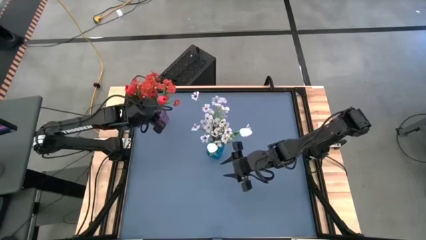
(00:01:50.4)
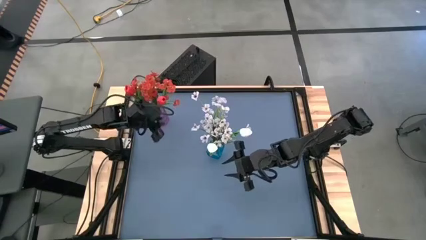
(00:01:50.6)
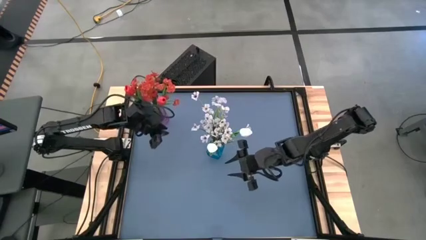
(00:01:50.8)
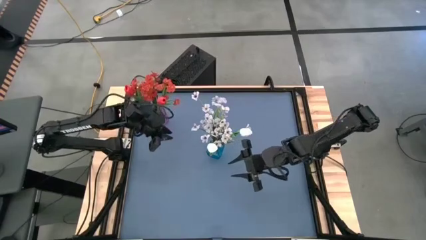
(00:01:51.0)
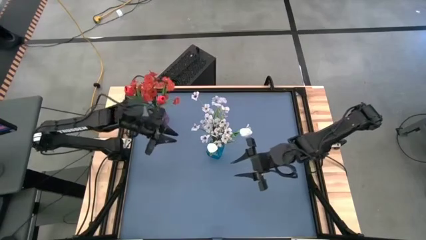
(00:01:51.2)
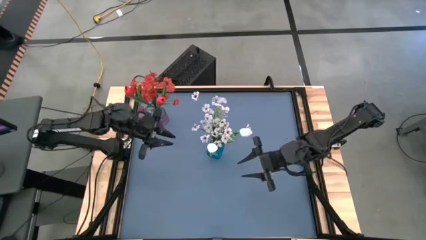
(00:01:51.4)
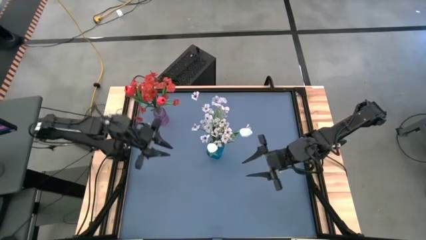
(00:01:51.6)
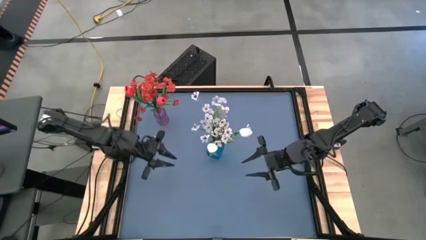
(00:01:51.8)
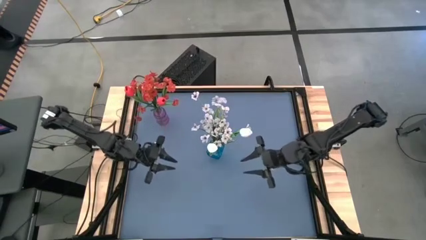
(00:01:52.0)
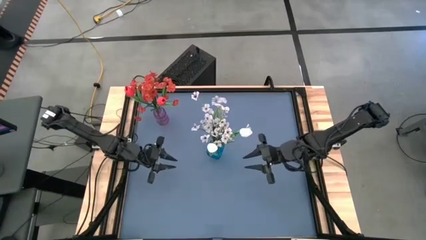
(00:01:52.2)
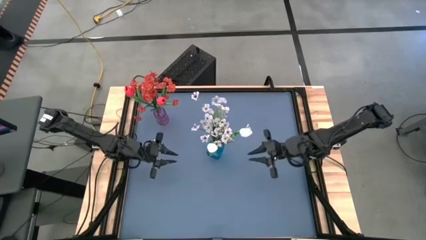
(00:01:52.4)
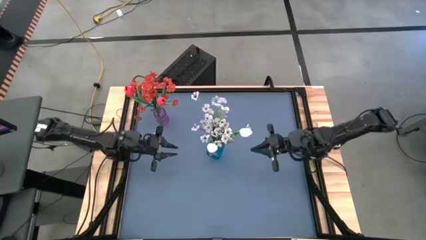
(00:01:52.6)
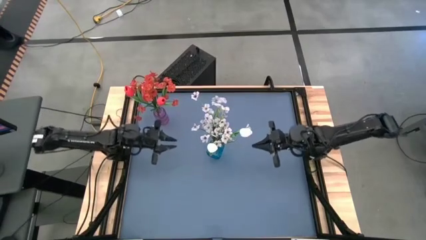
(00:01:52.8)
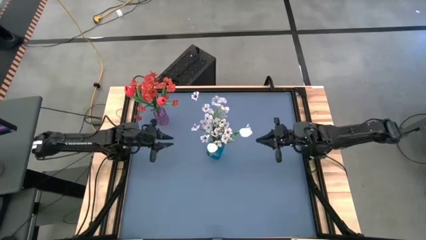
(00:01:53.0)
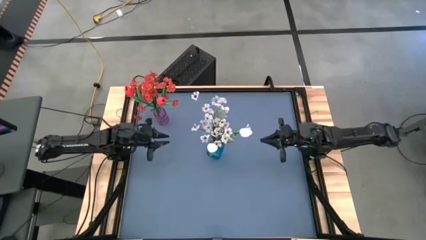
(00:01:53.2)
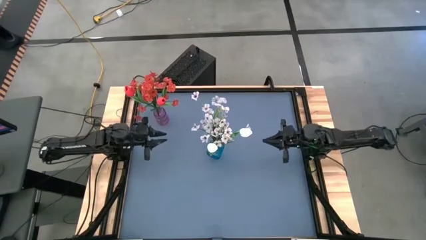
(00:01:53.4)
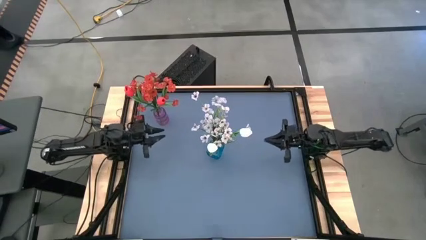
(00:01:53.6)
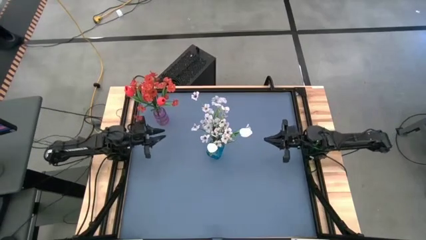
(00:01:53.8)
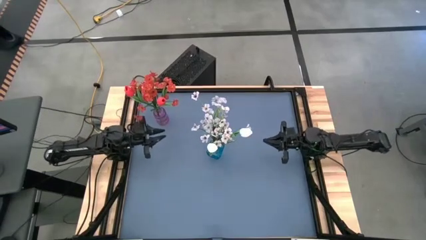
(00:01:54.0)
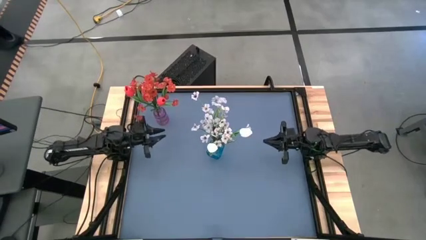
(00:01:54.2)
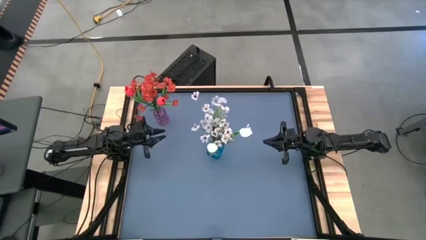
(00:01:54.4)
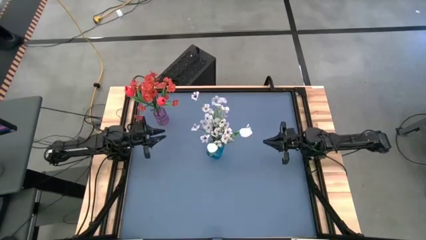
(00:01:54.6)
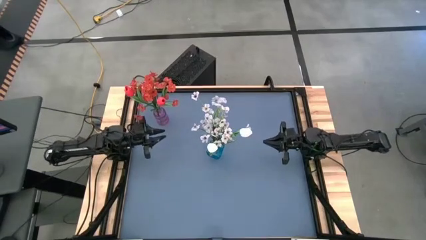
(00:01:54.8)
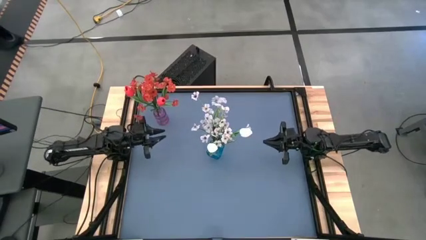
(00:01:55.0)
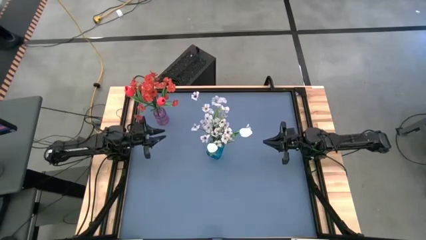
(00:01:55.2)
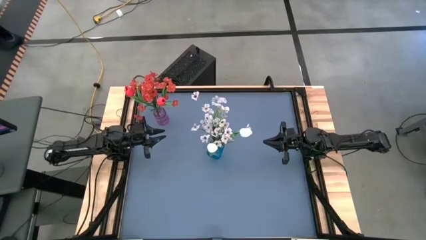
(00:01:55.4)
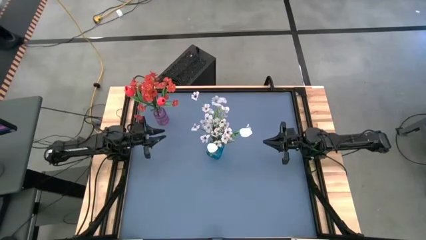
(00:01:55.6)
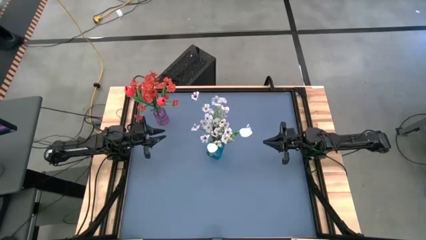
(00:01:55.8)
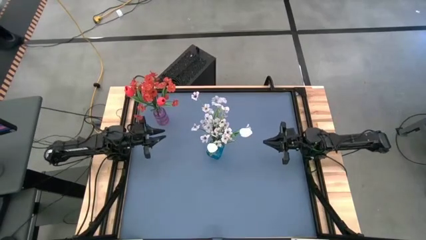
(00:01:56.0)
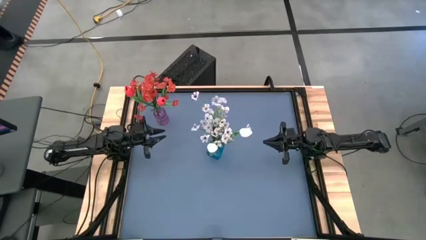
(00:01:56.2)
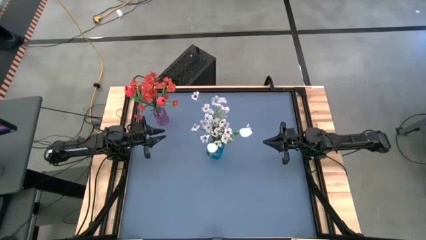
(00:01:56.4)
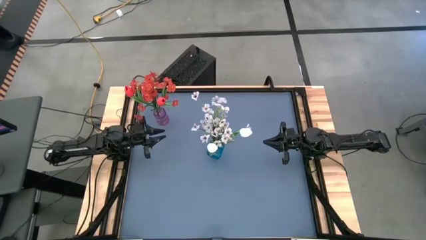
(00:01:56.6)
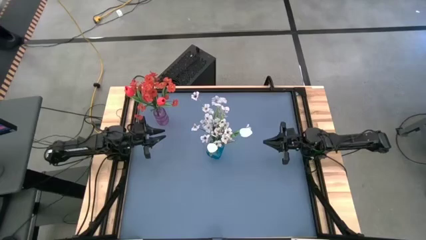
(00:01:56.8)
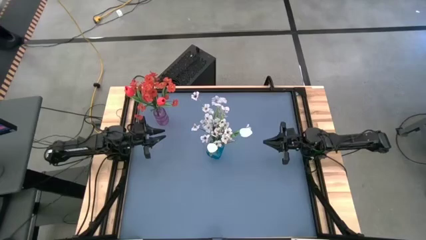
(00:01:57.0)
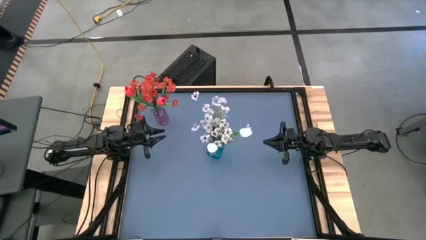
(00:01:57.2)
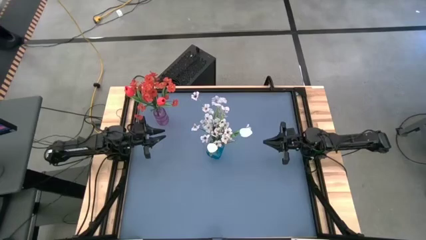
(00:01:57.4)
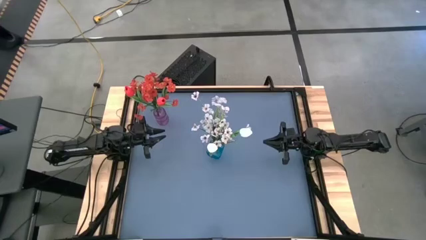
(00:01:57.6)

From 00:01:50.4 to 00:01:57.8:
Task: Sort flowers into vase by color
Return to Home Position
